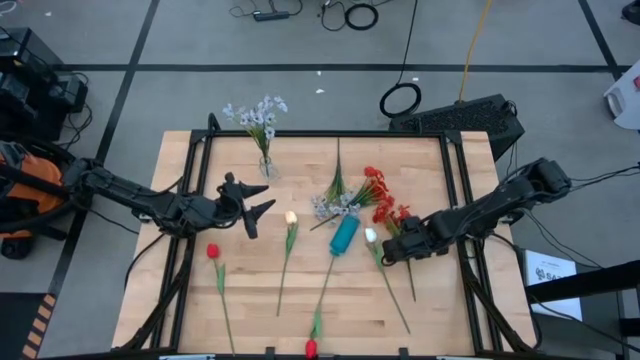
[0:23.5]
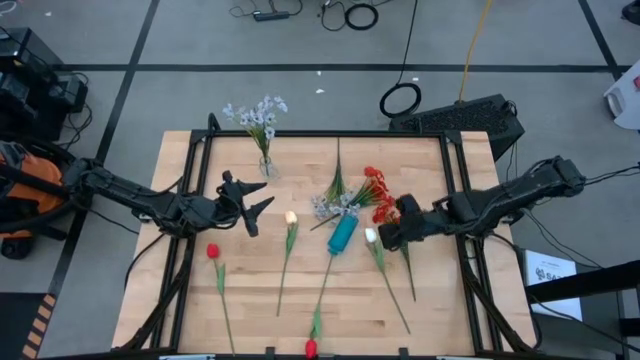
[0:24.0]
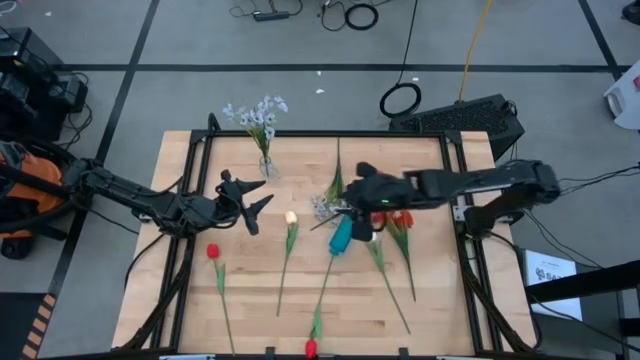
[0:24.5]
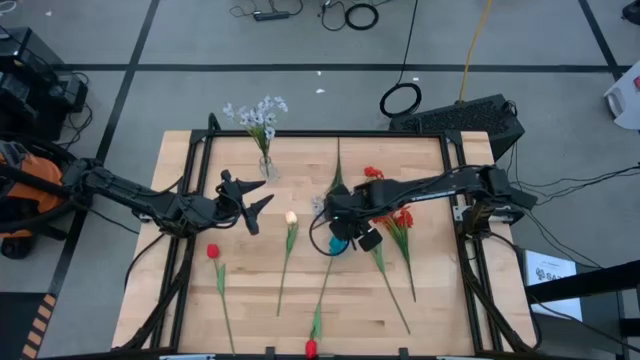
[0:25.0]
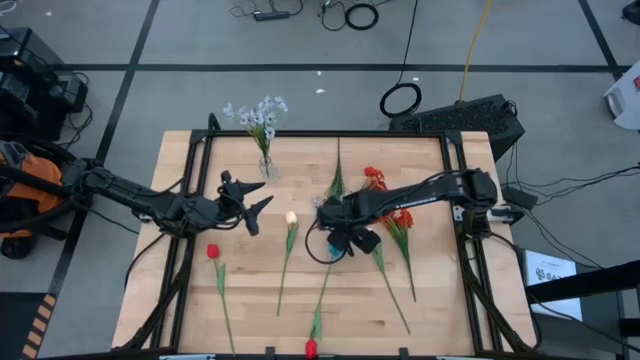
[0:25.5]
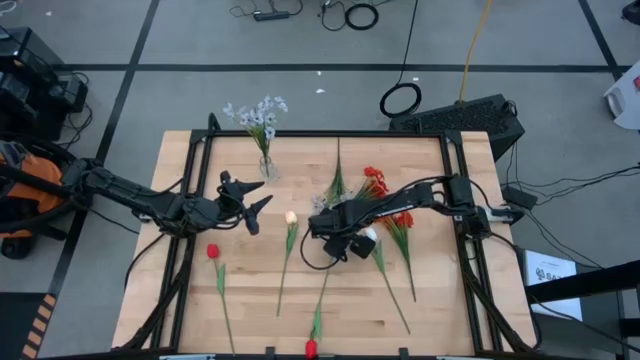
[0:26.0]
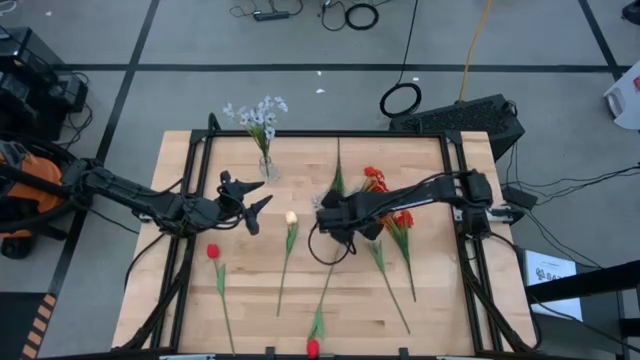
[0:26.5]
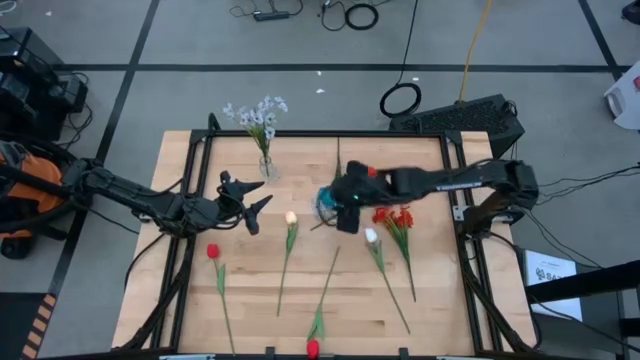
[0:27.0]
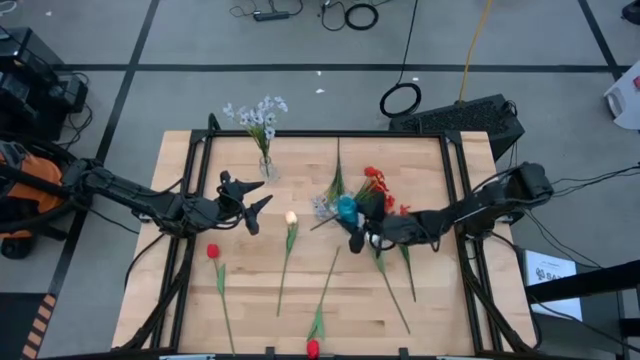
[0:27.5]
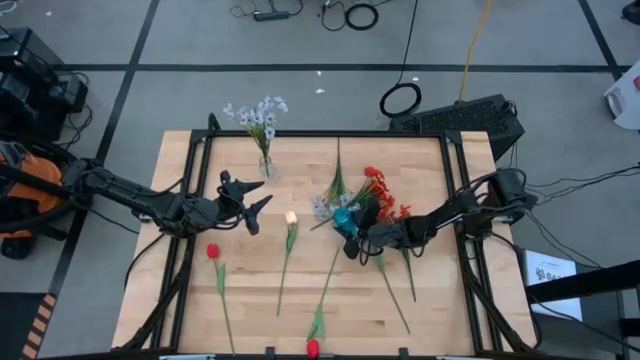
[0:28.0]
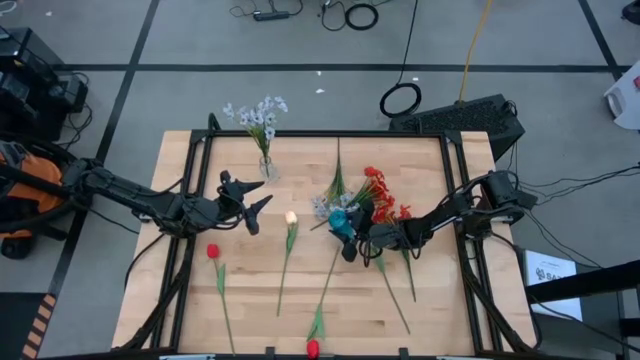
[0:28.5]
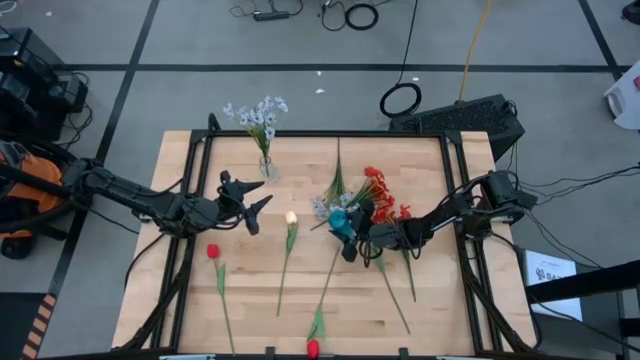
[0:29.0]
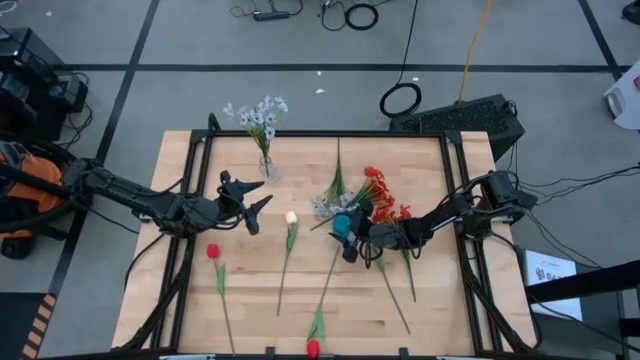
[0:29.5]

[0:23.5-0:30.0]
Task: Sort flowers into vase by color
Prepare the blue vase

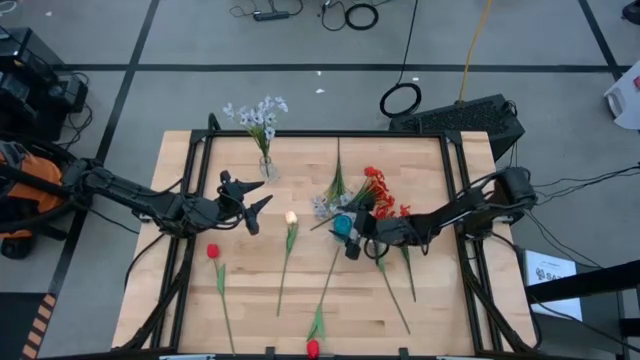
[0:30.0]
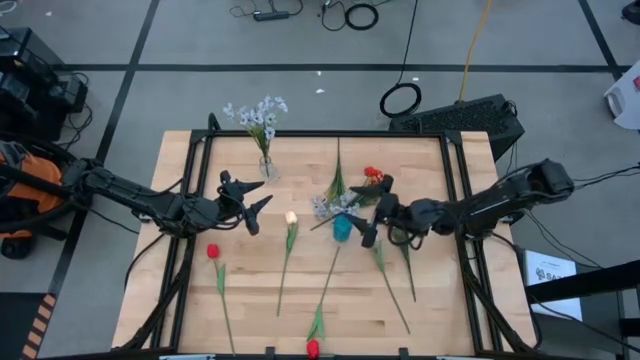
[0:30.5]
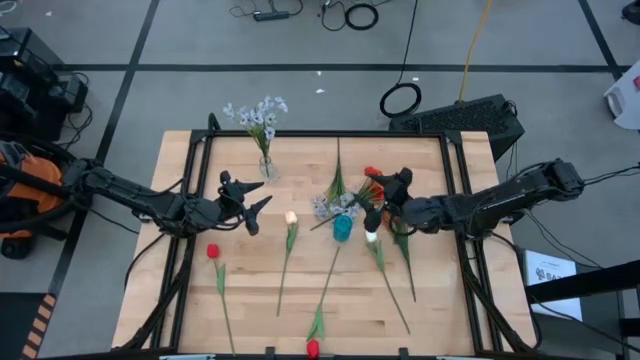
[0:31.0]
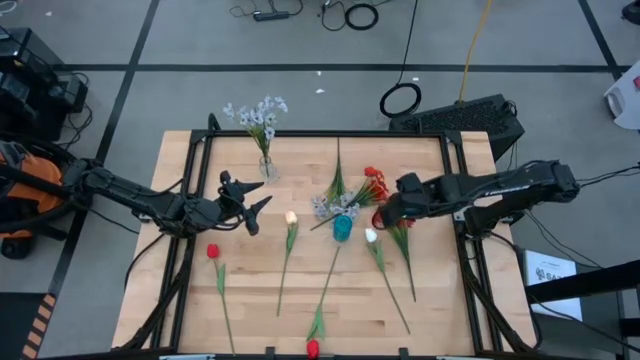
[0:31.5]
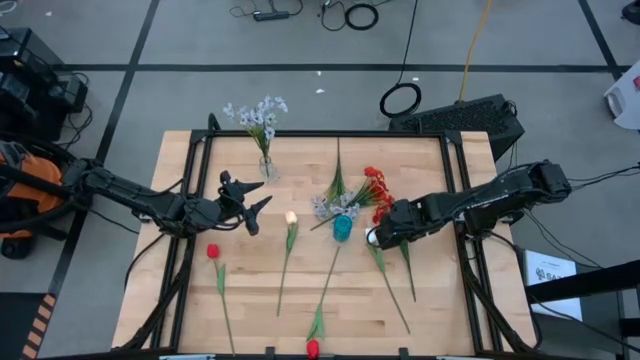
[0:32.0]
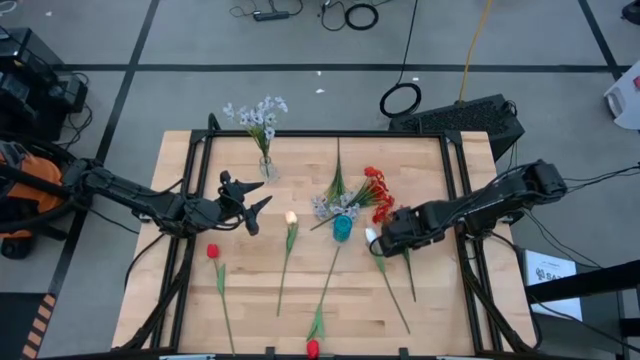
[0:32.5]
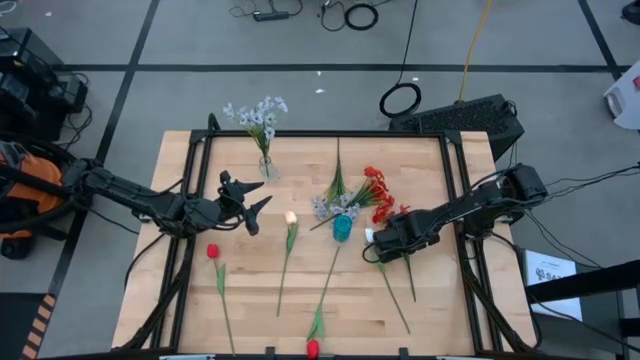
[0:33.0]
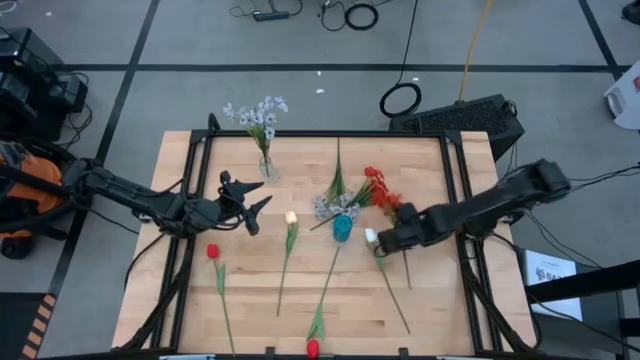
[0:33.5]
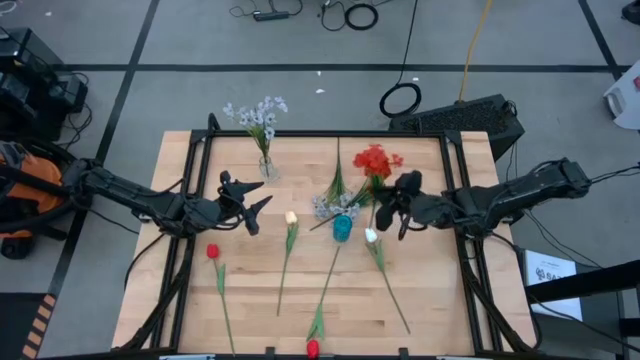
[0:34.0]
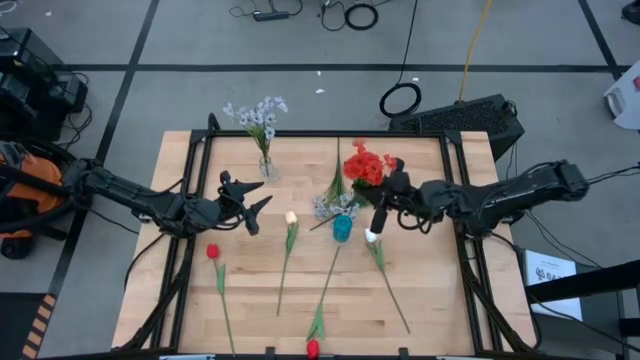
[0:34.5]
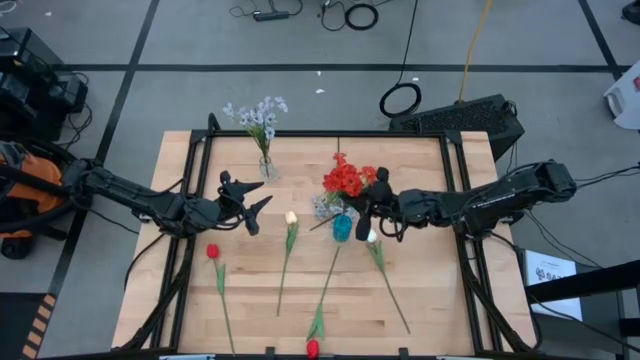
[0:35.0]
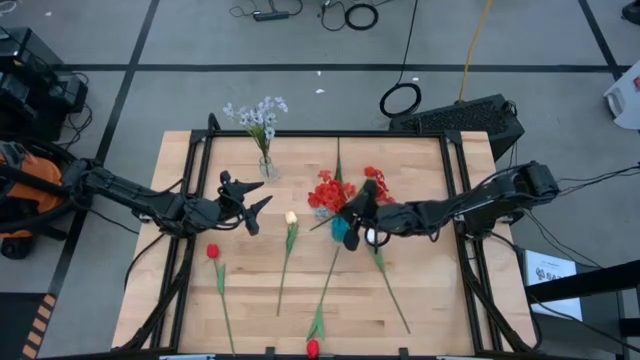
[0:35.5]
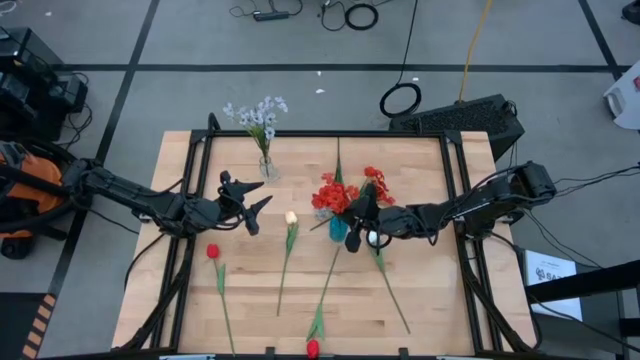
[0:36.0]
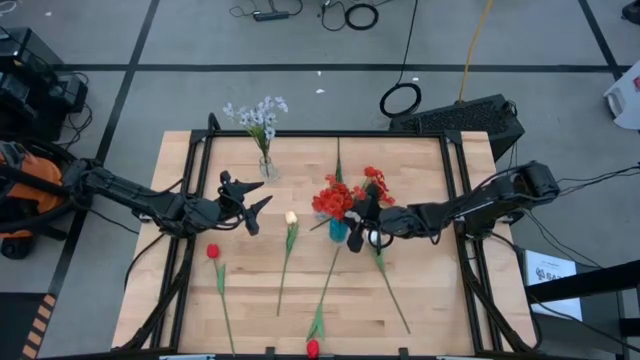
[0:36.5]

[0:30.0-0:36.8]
Put the right red poppies into the blue vase

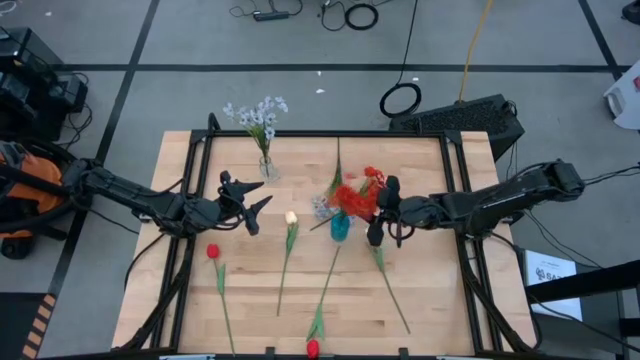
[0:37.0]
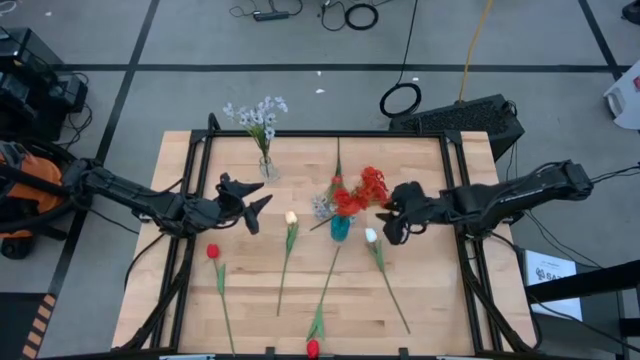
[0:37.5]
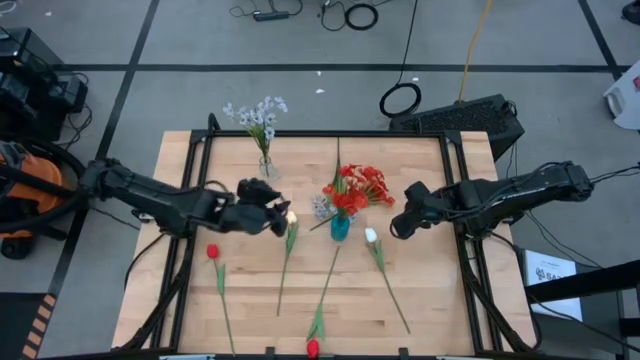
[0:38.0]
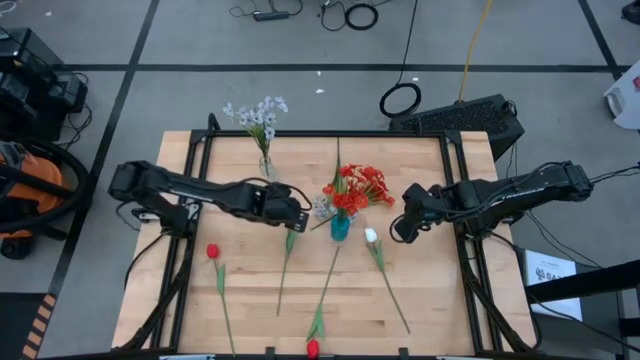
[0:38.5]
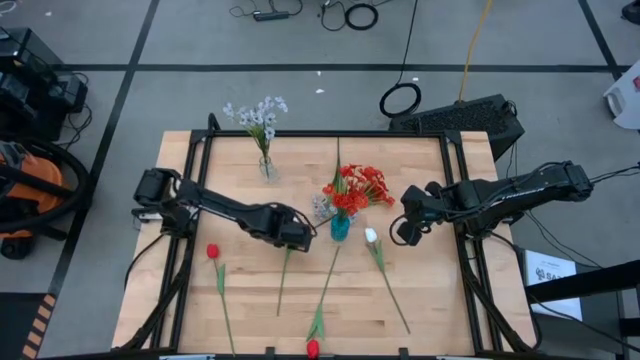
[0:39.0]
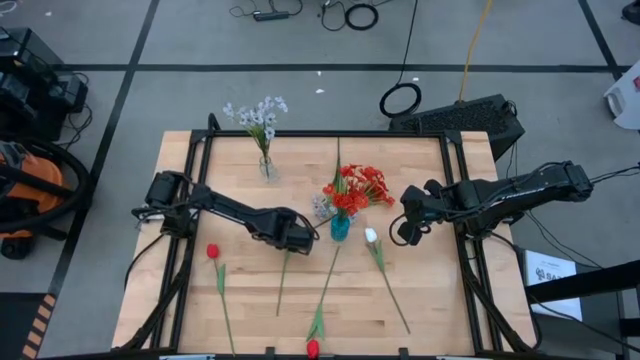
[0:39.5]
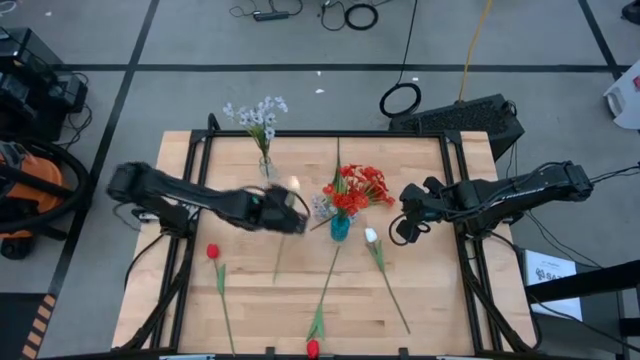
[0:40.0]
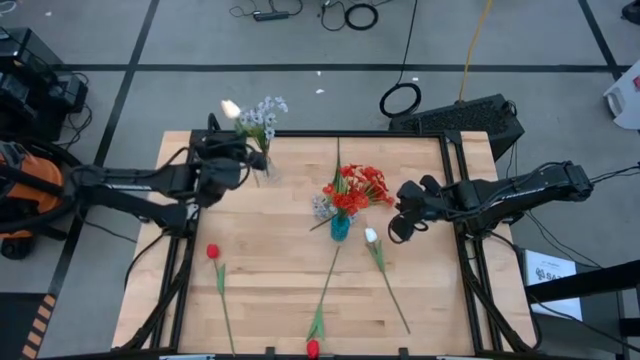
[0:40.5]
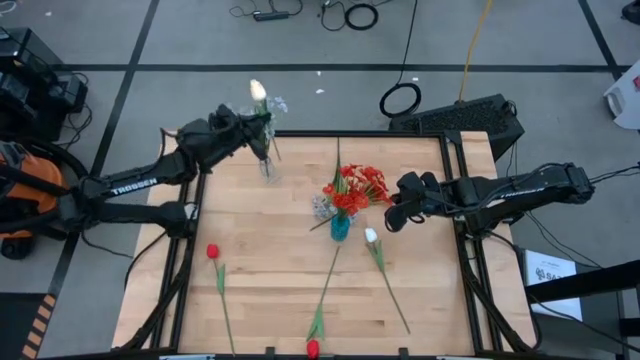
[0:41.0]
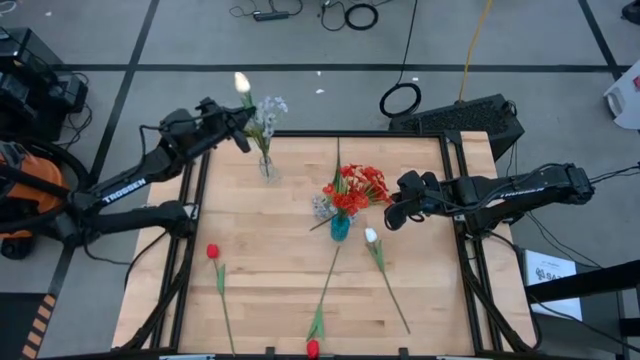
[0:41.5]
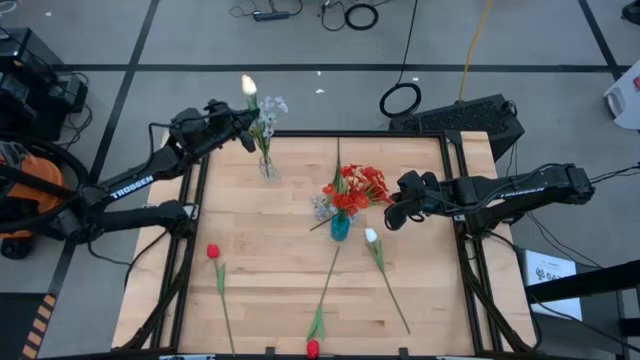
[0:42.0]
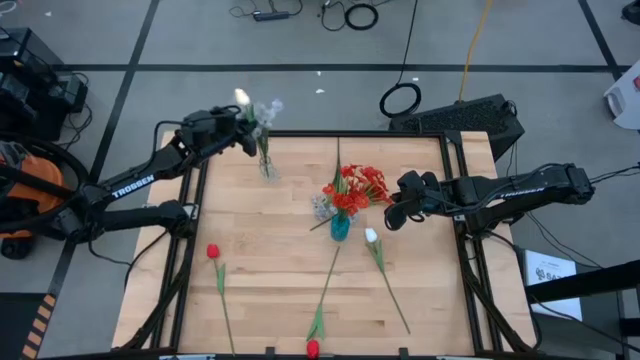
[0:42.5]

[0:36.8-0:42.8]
Put the left white tulip into the transparent vase

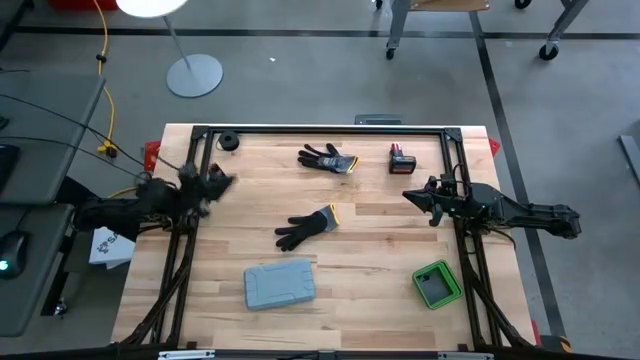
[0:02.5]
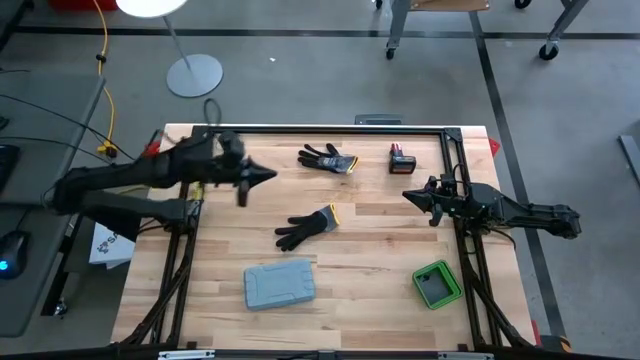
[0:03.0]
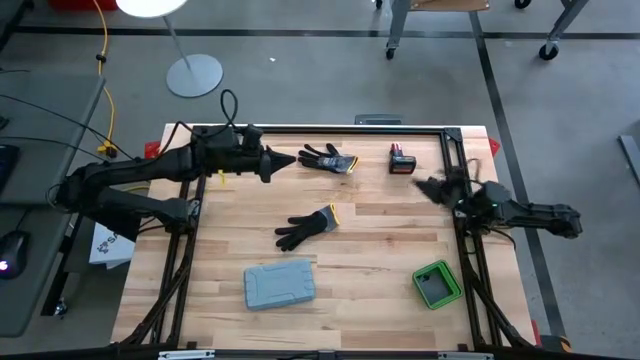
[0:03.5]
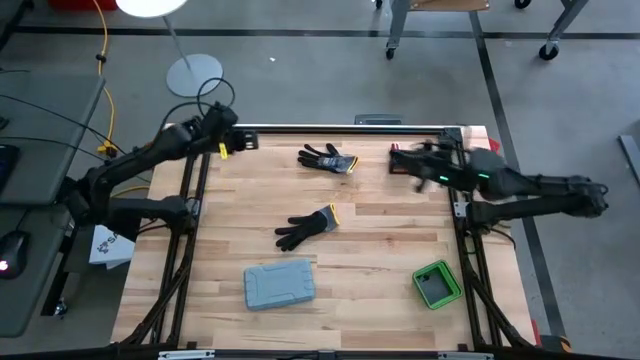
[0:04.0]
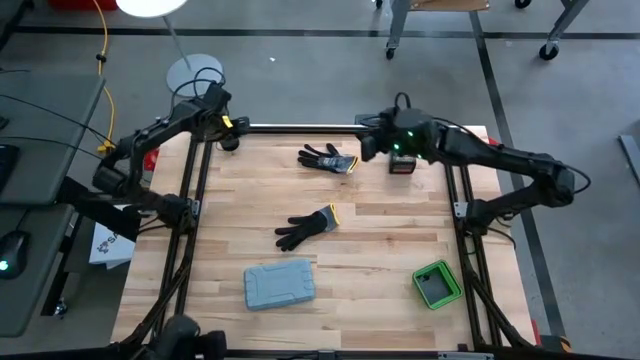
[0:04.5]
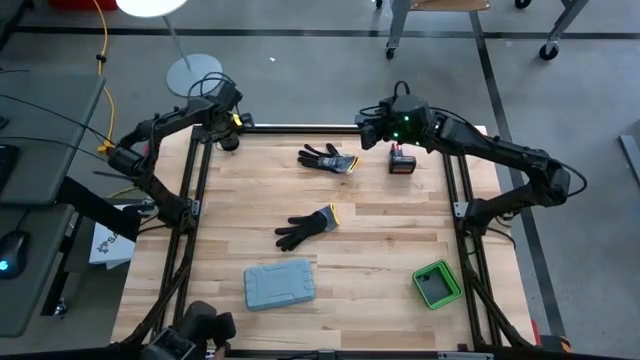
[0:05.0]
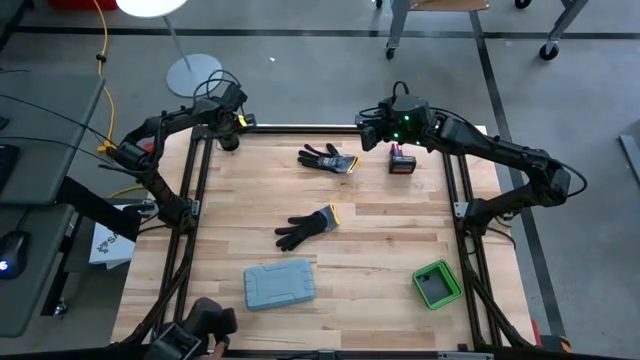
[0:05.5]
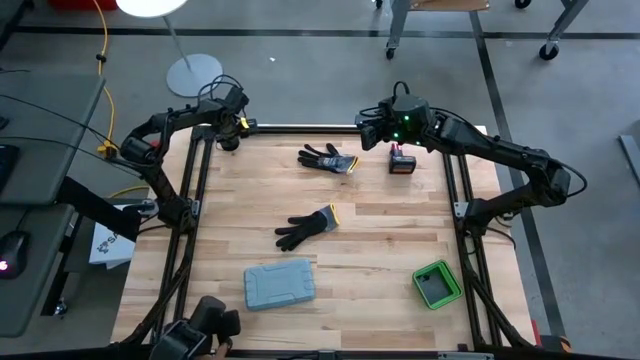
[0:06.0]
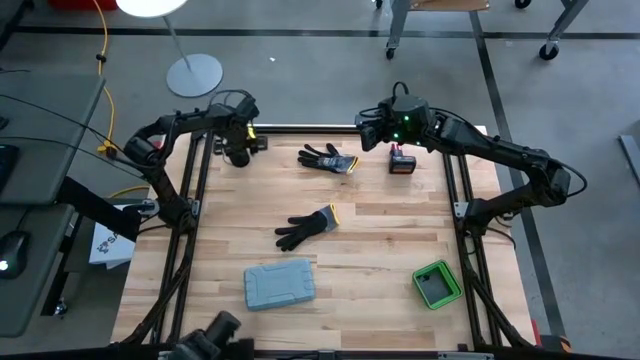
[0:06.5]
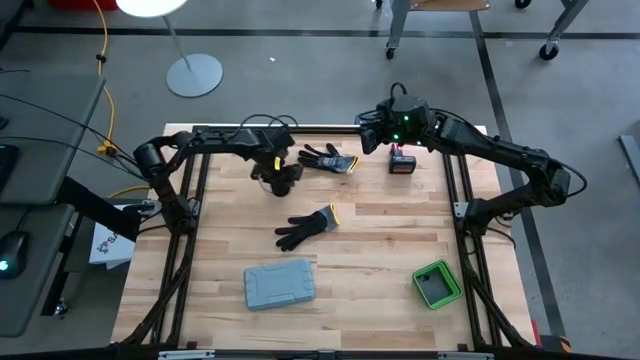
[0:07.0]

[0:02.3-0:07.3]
Task: Coil cords
Move the black wire cable to the center of the table
